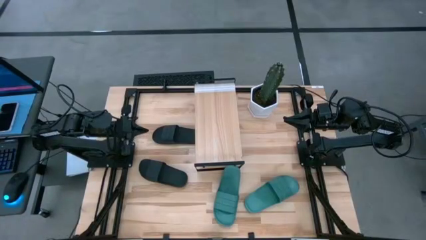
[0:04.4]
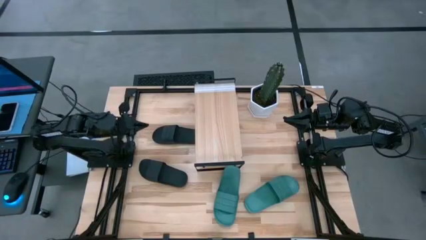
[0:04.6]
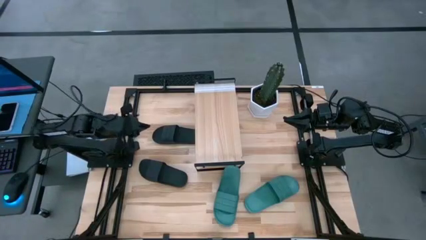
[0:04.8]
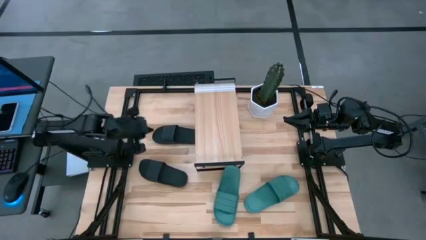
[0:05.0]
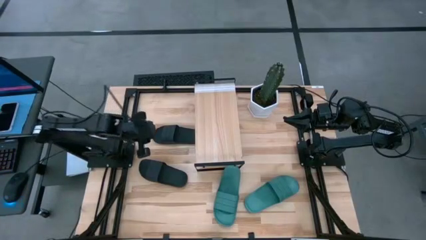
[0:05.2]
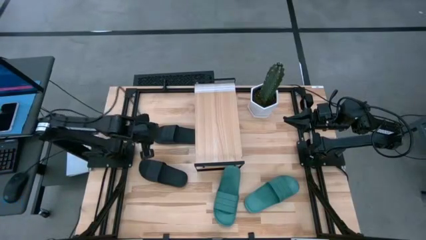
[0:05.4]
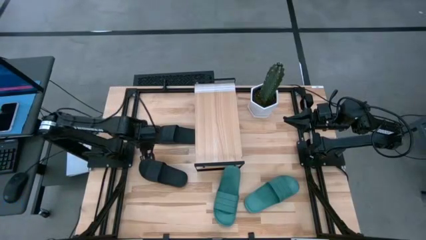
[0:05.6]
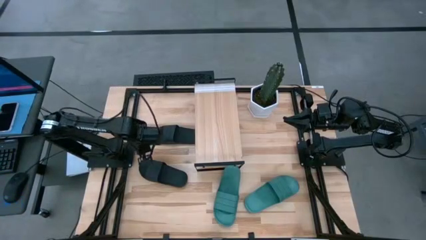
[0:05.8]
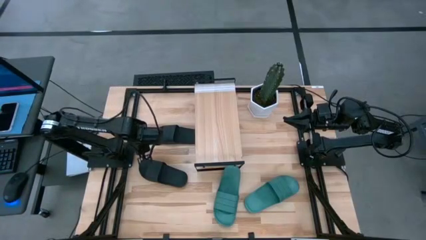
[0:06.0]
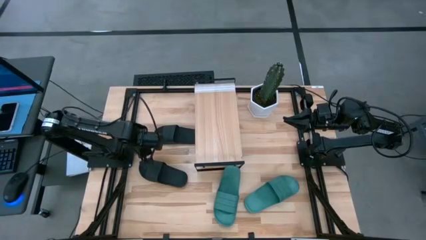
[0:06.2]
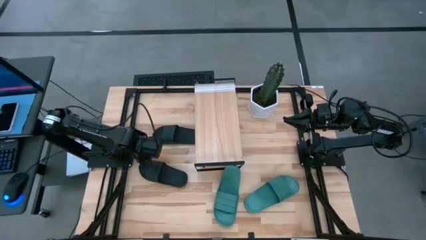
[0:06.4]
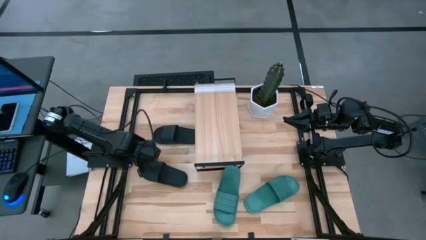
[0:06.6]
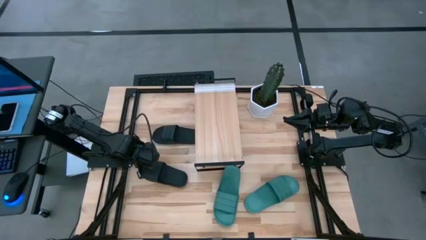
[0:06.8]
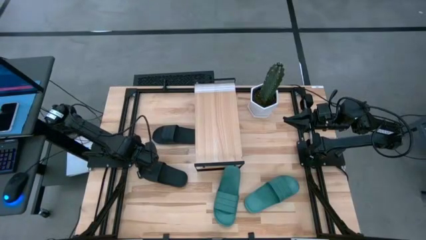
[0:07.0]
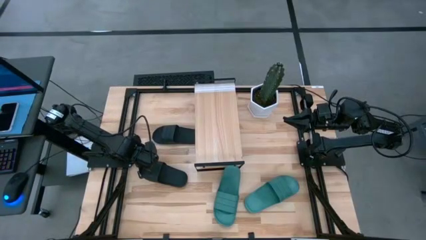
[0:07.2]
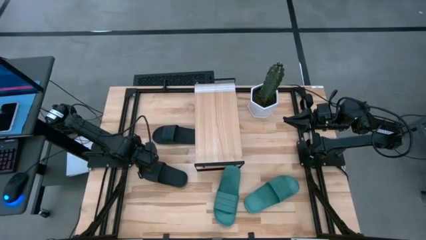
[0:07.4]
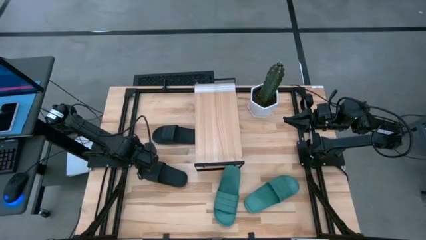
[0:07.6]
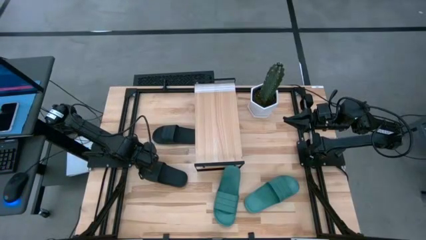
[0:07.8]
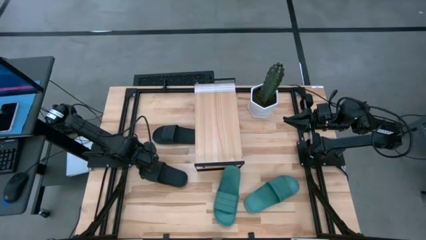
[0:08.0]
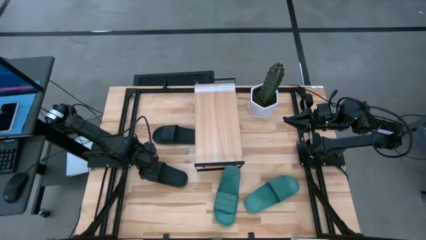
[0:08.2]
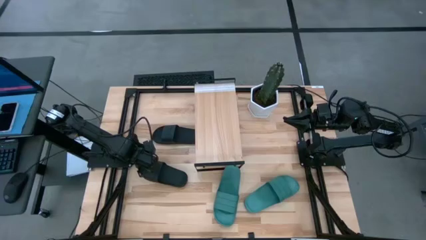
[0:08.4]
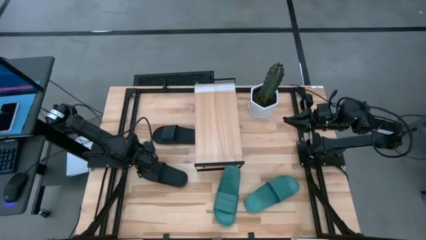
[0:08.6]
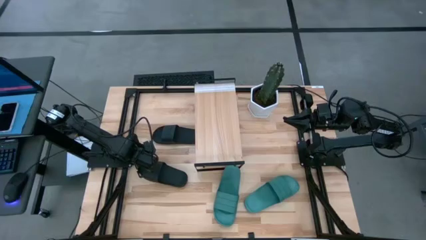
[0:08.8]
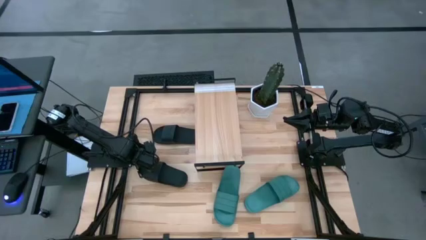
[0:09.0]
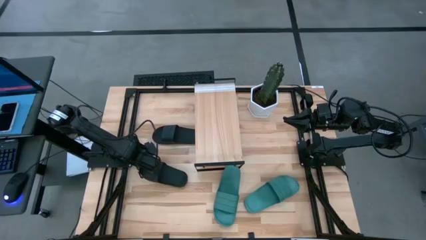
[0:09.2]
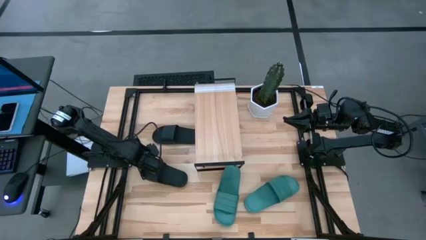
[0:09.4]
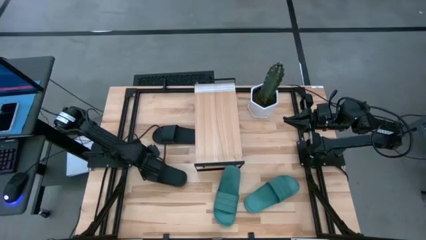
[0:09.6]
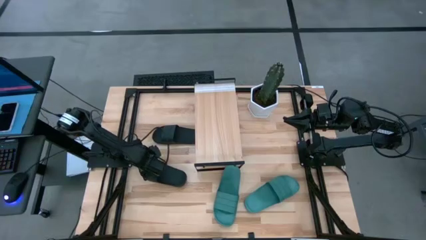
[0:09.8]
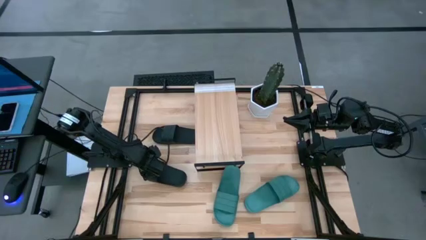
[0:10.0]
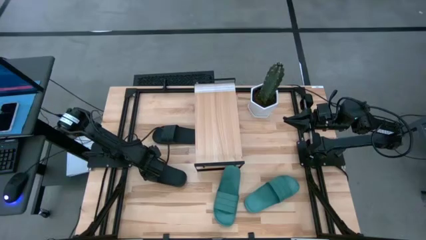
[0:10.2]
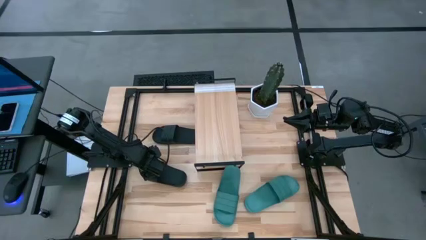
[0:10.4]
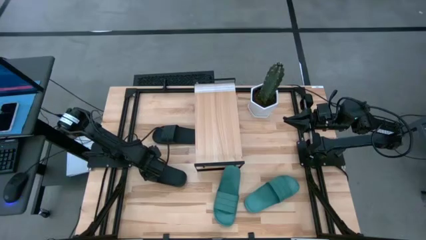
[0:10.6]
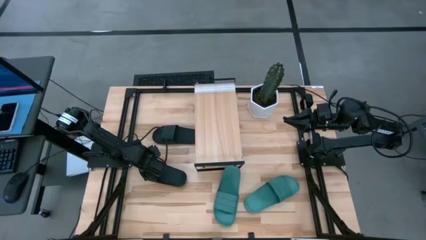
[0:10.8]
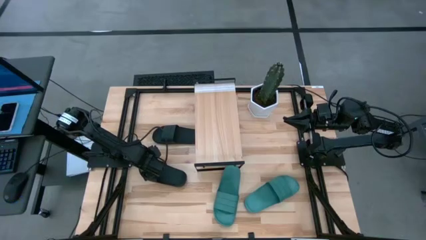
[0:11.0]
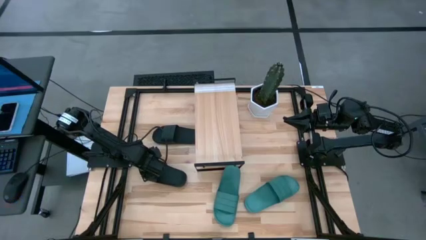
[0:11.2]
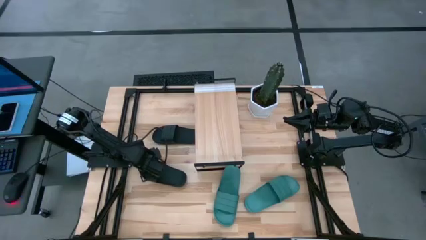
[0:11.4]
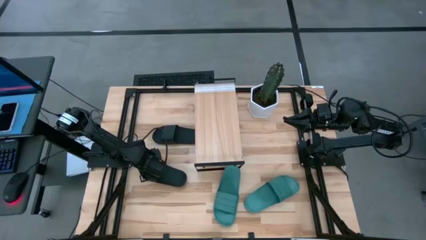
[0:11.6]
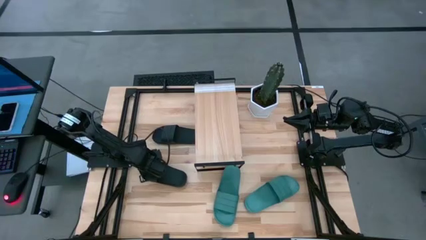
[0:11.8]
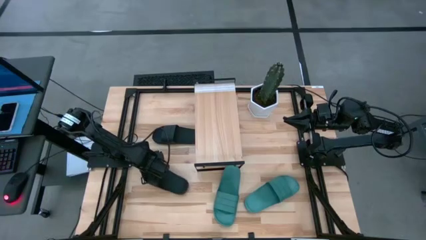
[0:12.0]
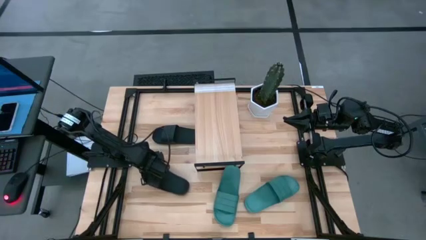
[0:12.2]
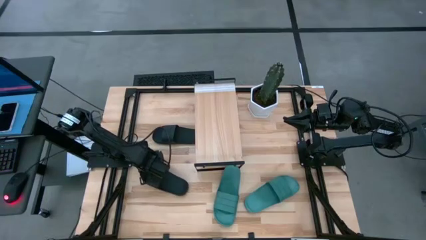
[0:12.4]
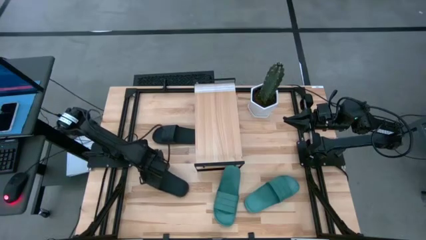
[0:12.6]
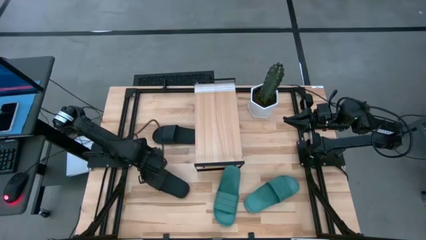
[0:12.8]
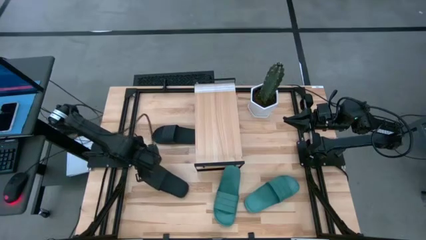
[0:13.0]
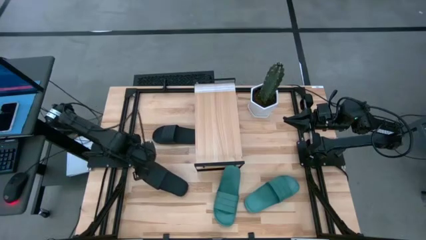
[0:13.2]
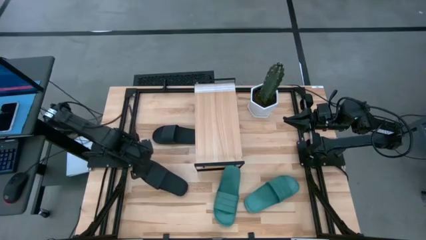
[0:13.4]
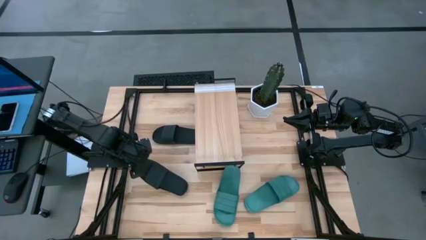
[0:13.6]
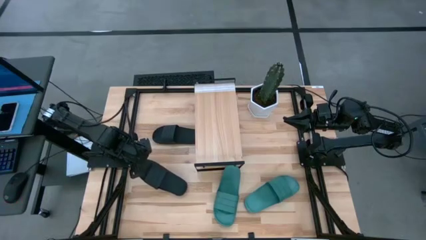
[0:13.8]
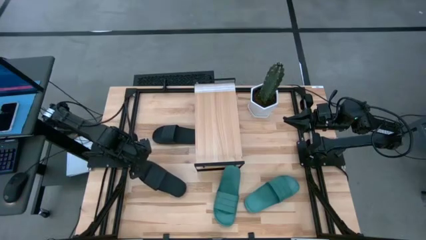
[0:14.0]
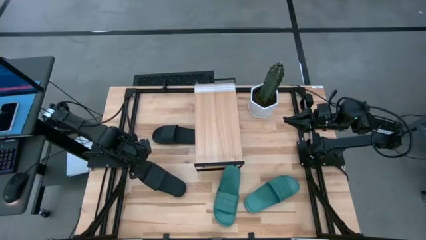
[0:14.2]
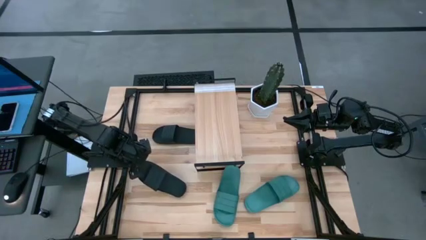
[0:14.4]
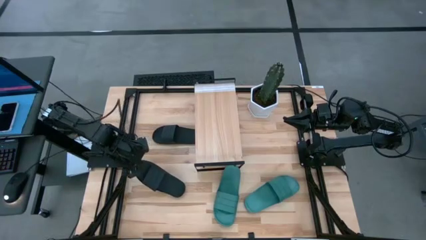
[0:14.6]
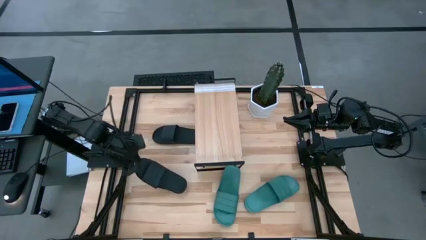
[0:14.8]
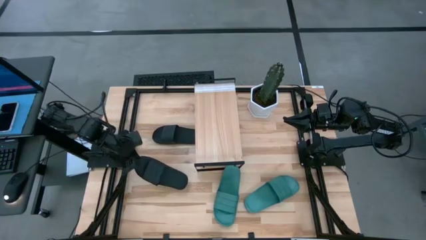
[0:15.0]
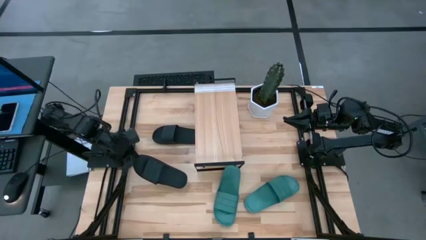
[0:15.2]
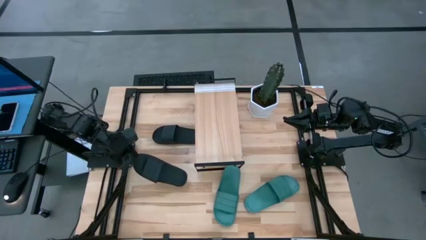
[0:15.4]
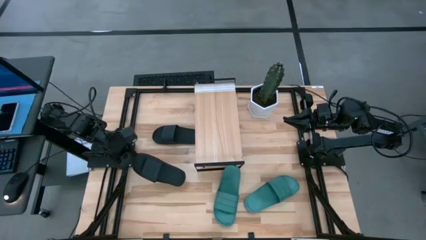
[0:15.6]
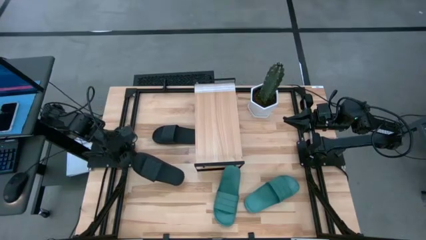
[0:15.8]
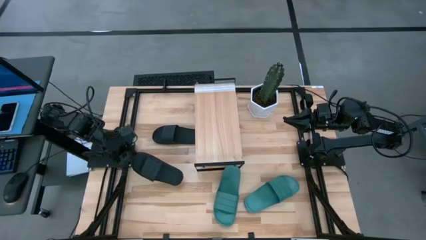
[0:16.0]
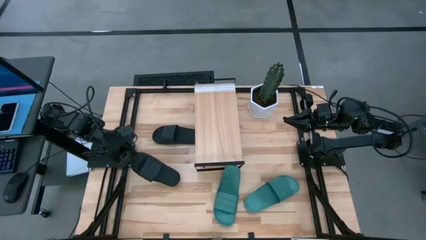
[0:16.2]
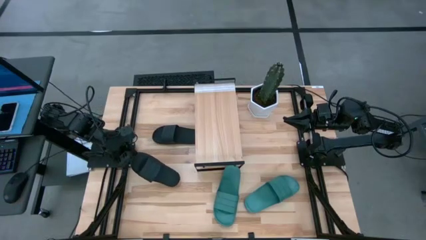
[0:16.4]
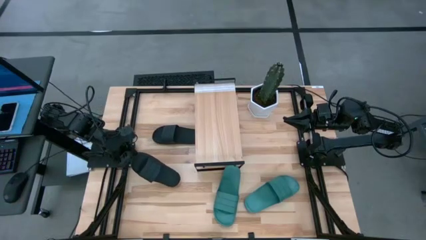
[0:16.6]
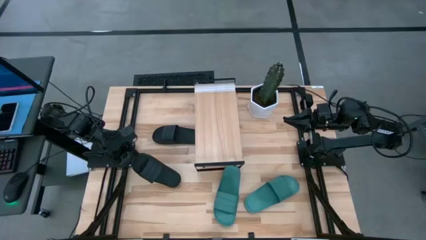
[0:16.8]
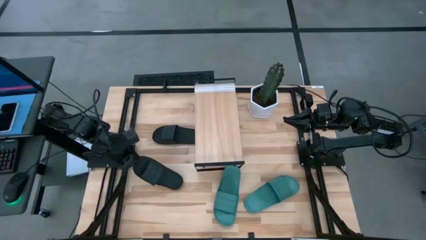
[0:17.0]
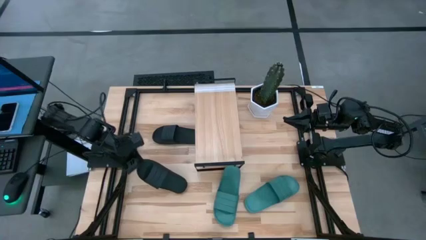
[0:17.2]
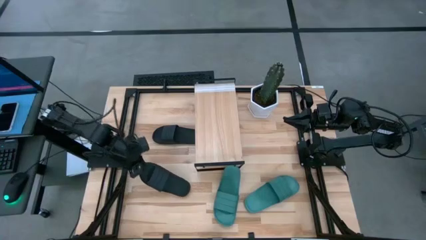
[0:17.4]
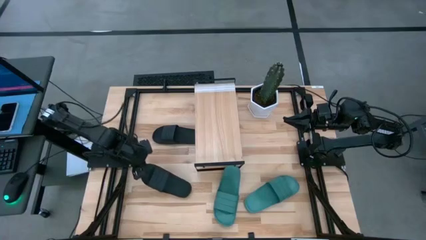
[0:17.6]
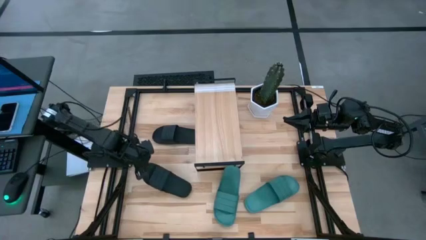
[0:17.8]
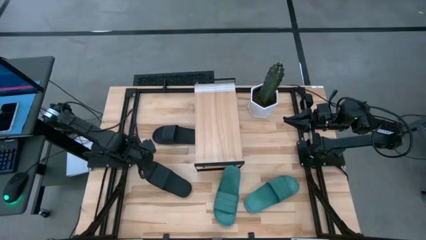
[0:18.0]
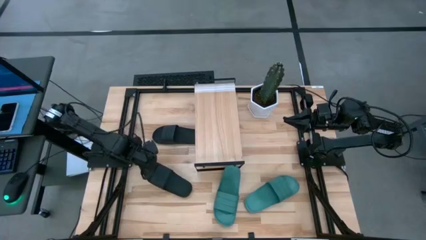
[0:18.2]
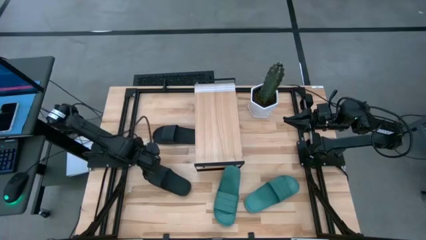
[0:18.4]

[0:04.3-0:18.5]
Task: Pick and place slides into the shelf
Put the bottom black slipper on the shelf
